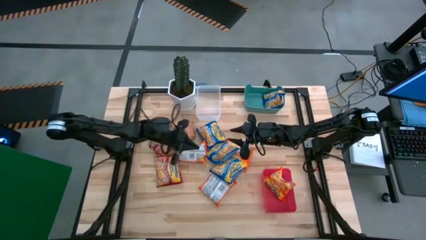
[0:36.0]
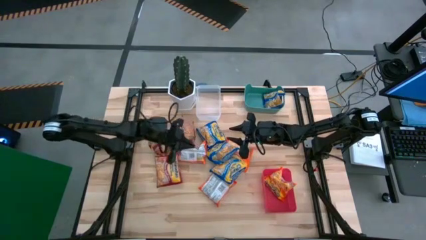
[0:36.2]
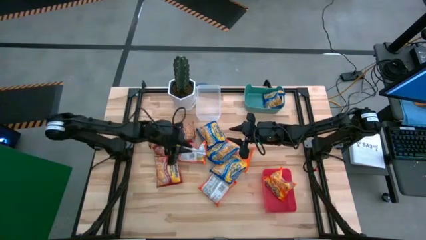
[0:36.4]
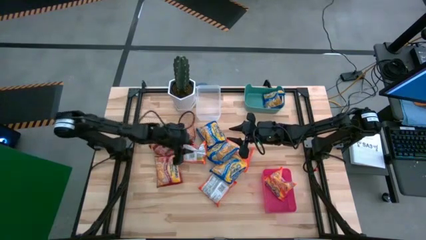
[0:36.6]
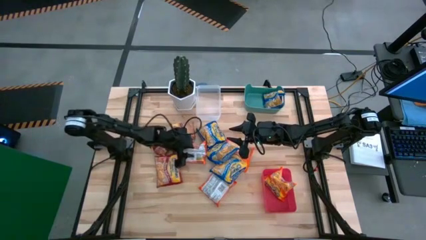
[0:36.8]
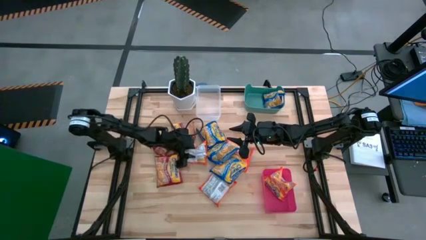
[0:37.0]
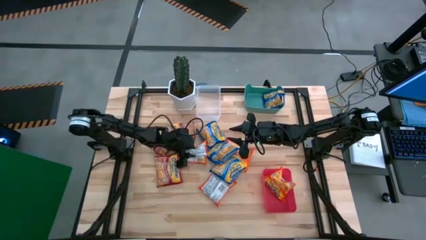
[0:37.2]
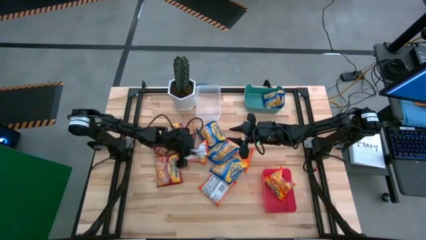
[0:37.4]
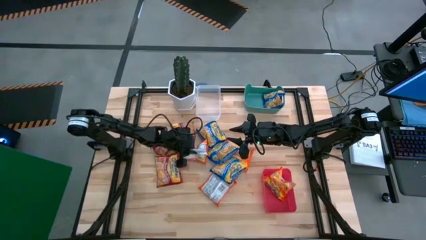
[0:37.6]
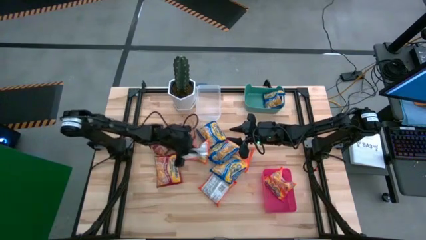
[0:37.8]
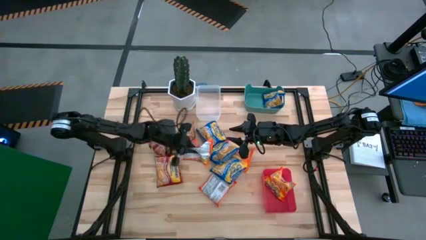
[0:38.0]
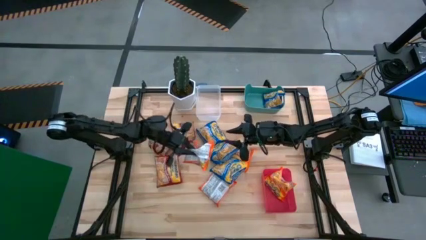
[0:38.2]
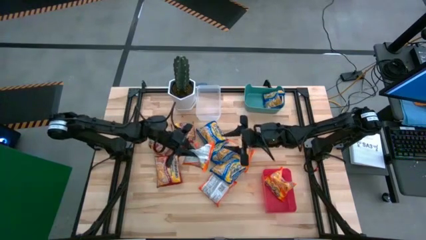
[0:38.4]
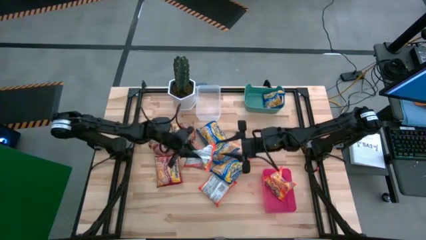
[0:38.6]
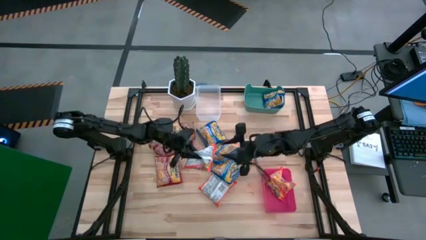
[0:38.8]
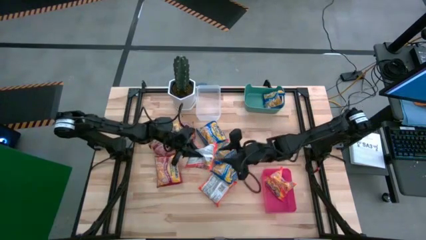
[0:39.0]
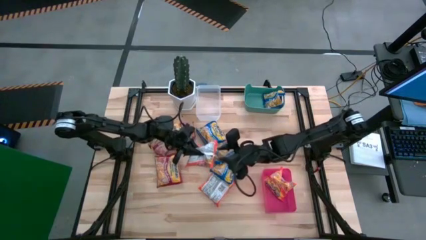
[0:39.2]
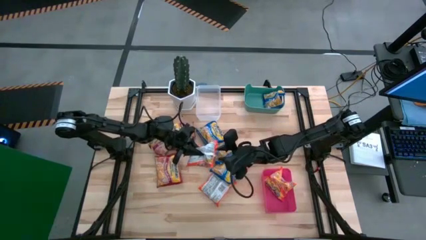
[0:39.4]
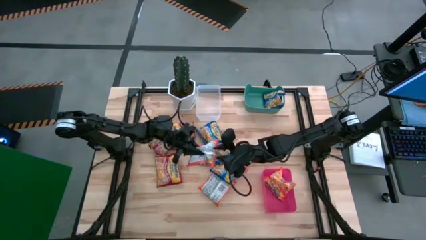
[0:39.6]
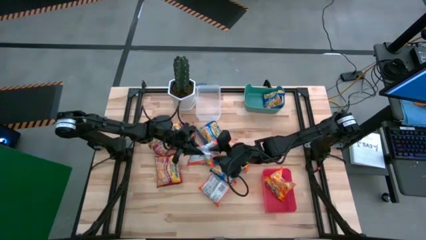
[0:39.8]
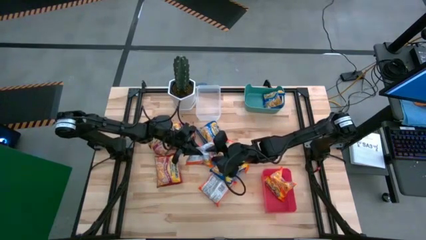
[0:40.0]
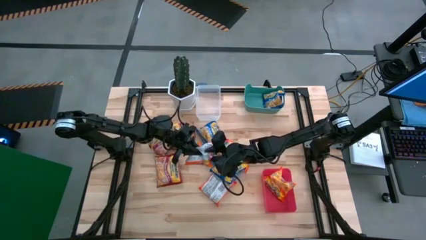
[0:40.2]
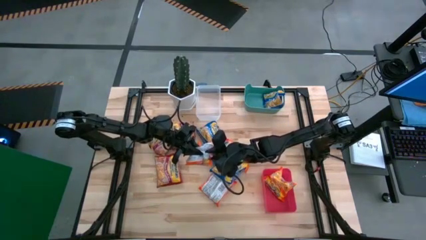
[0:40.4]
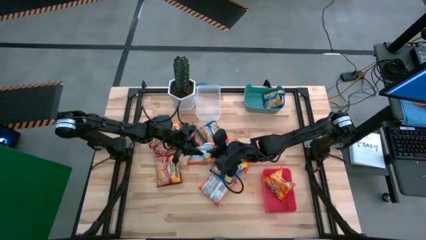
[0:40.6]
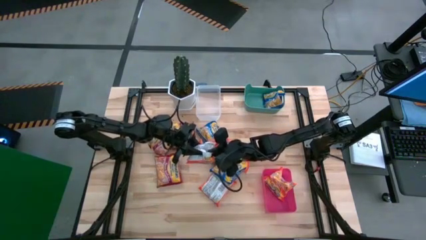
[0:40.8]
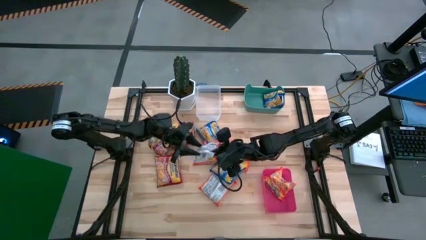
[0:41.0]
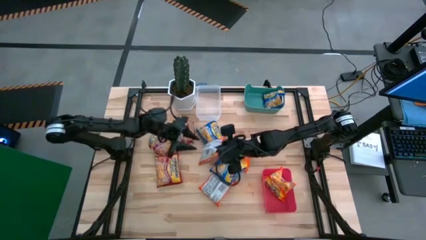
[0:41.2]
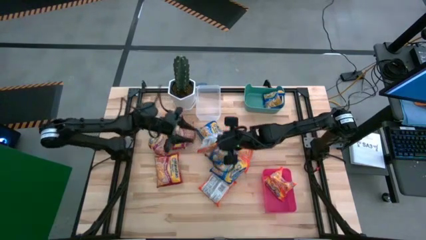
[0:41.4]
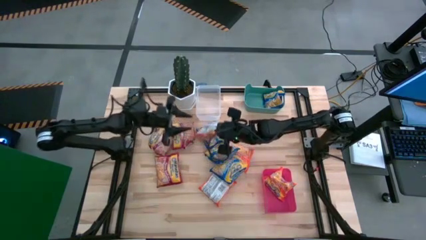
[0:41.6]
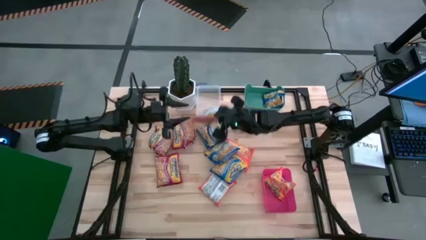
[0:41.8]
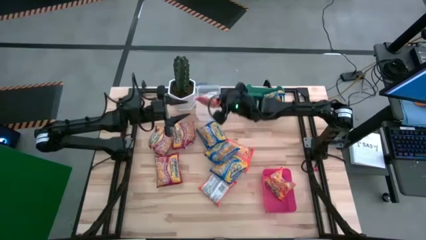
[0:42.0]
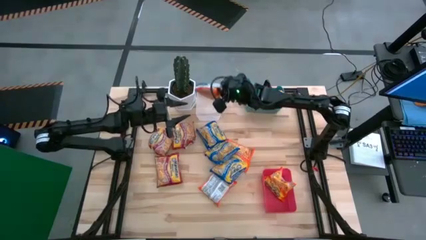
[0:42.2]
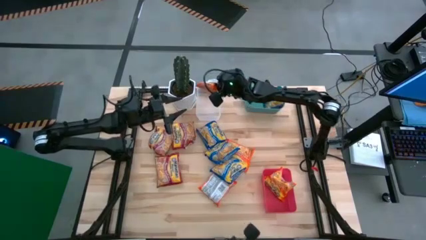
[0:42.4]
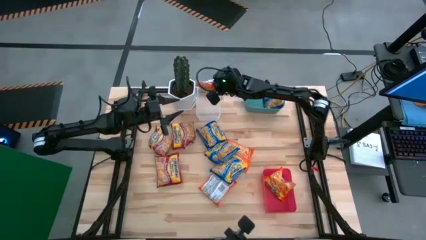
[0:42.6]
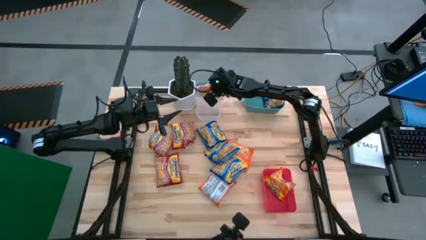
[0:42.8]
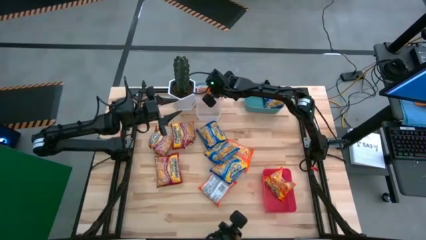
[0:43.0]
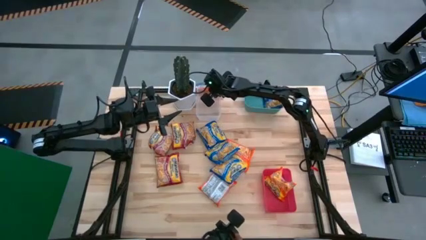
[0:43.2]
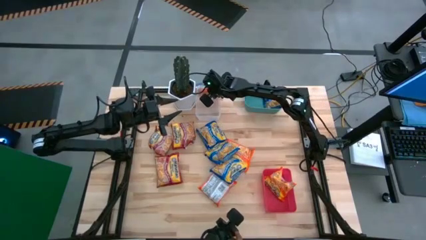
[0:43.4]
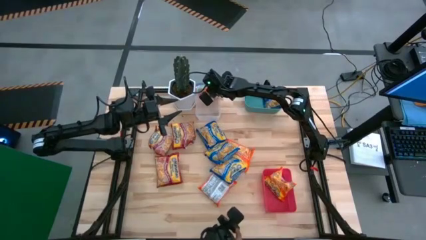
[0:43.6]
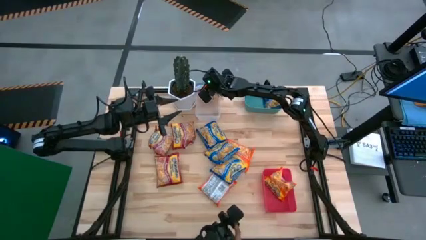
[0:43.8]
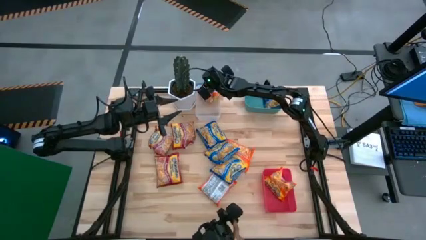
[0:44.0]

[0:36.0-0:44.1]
Task: Sort Maruchan noodles
Put the orange noodle pack into the transparent bin

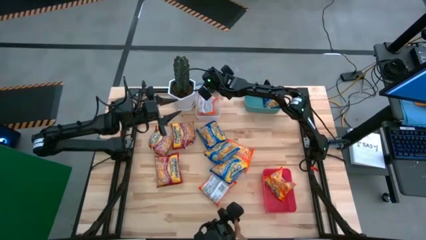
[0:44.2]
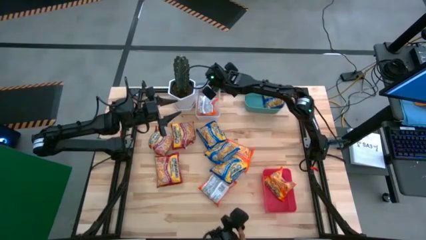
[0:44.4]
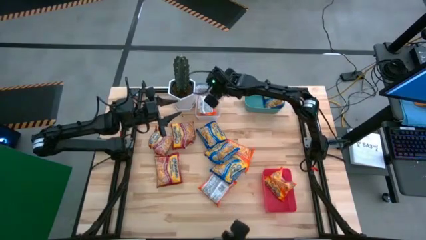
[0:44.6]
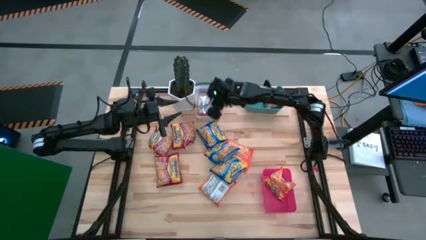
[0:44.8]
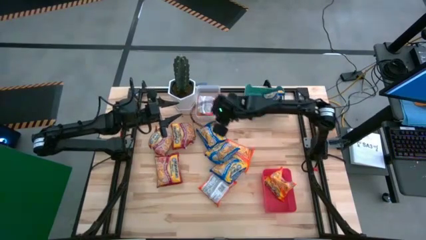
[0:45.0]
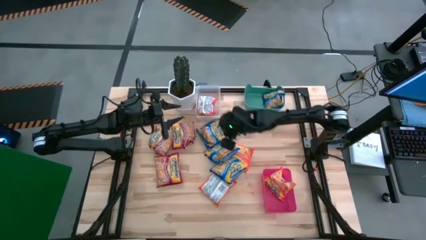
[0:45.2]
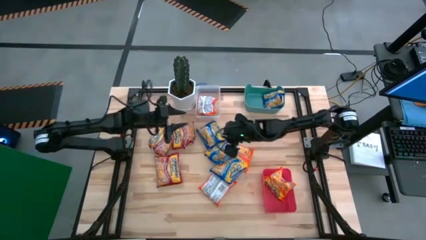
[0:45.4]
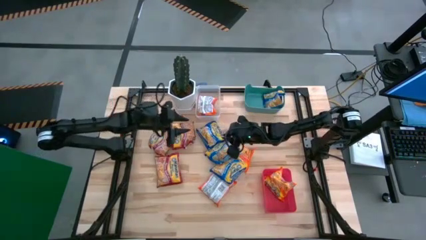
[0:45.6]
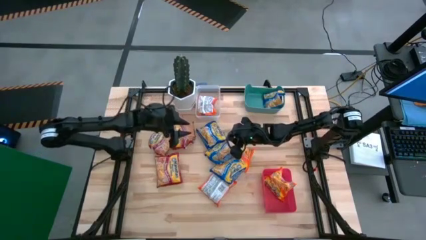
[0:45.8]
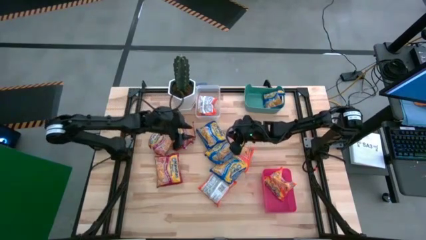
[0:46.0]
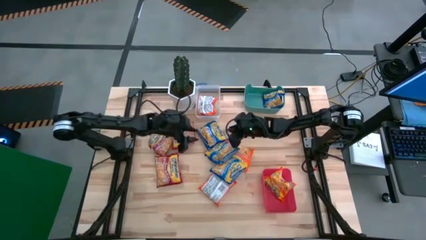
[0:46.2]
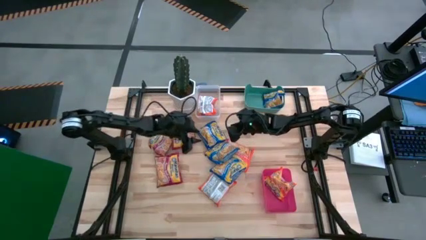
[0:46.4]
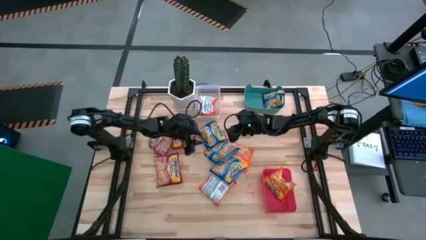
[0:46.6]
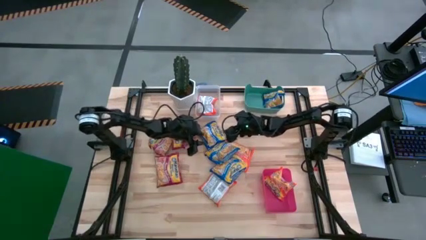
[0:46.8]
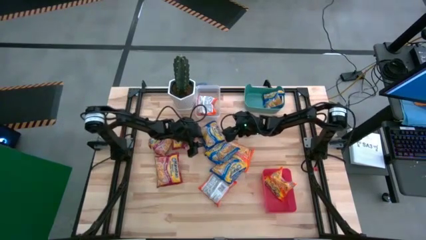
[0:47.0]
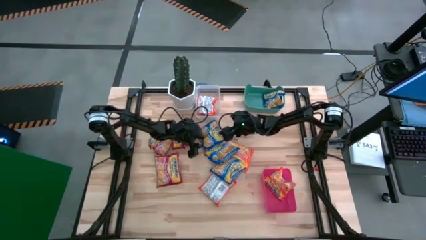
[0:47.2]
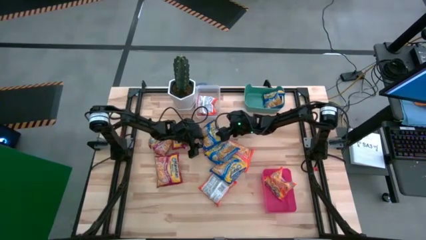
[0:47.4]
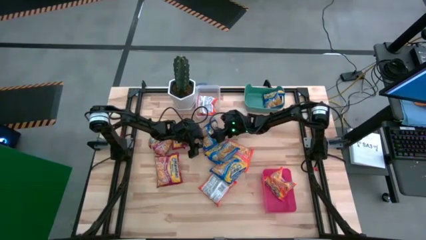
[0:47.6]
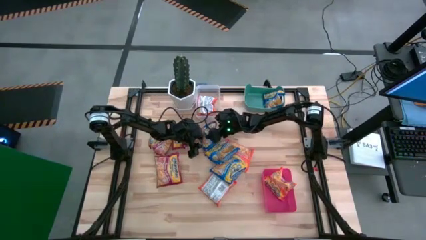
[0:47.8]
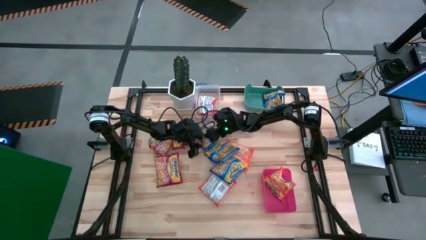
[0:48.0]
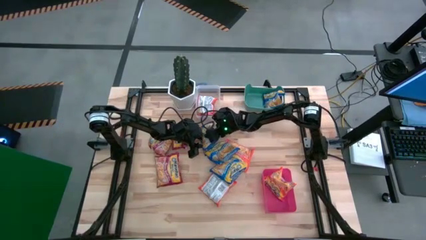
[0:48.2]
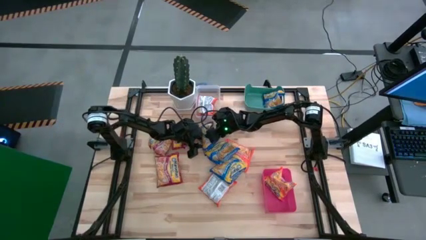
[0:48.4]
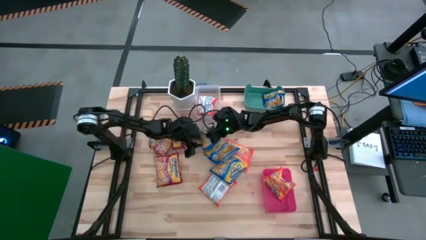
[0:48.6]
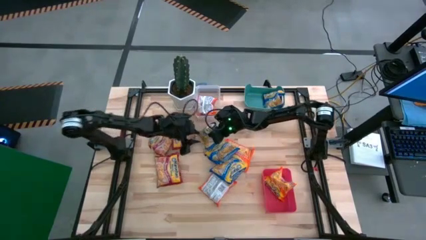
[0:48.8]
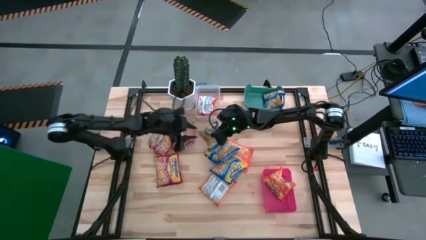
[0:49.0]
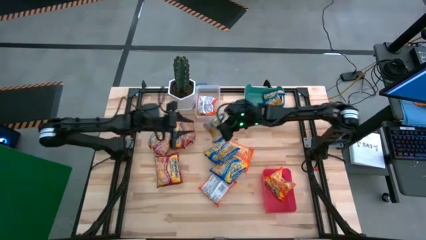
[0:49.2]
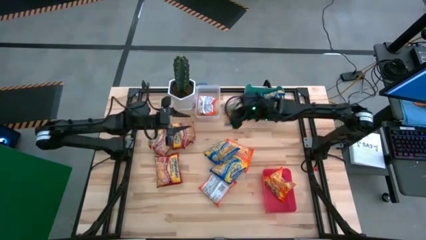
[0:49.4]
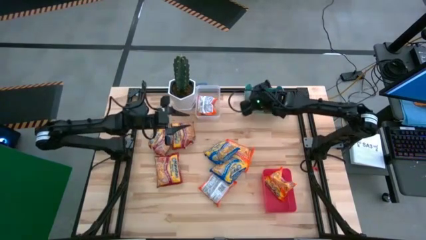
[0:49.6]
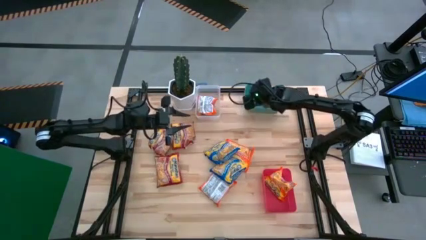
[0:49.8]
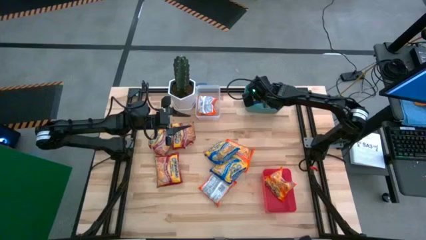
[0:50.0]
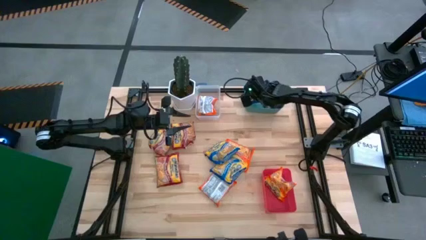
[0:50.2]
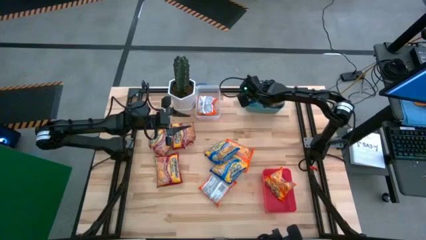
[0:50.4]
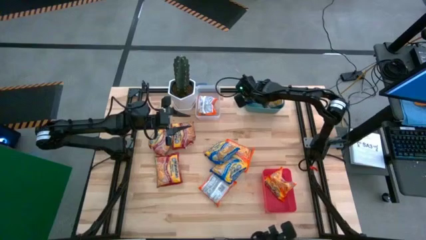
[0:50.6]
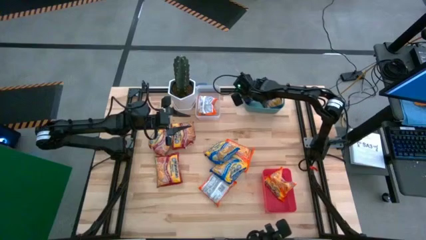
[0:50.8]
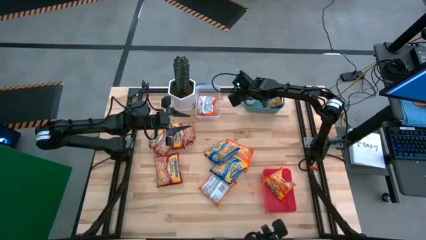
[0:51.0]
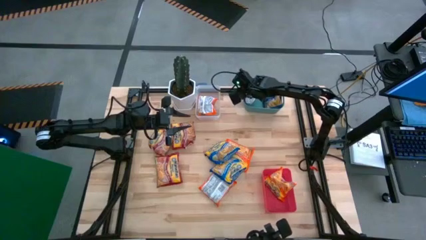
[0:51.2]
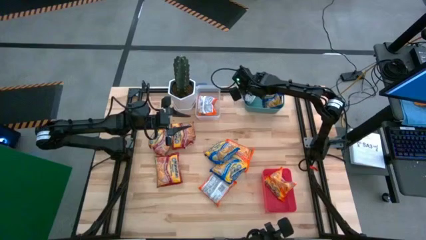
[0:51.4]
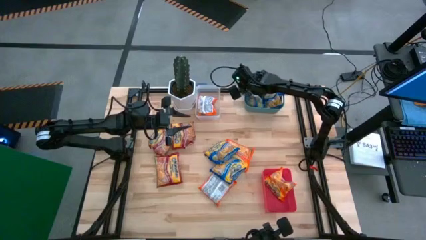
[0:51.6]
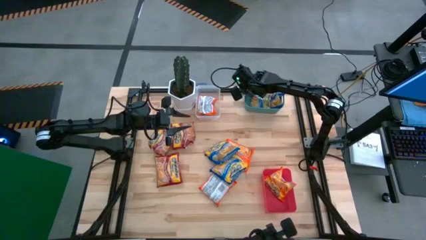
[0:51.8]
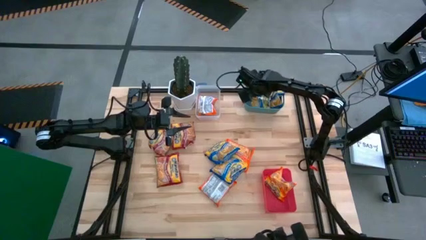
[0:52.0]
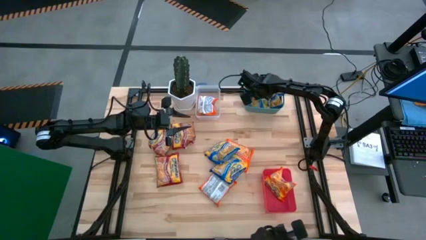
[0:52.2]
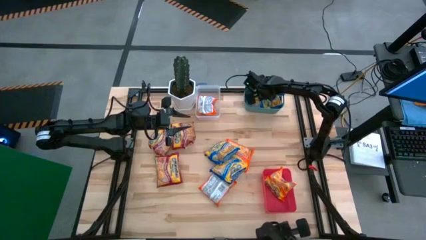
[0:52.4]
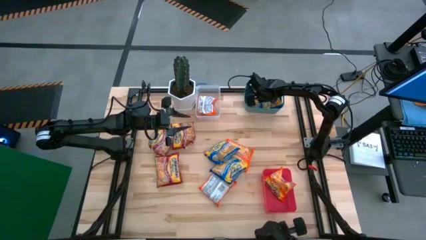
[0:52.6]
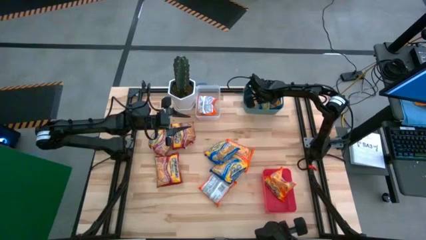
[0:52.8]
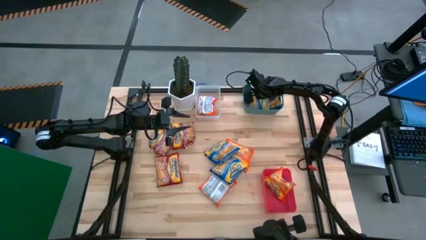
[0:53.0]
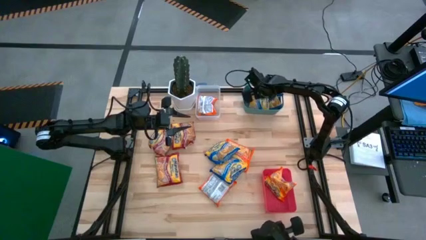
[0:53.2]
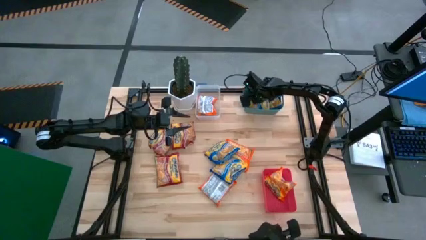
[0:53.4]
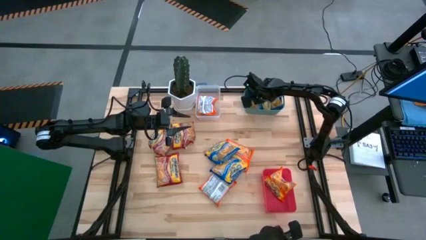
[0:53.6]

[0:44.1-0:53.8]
Put the blue noodle pack into the green bin
